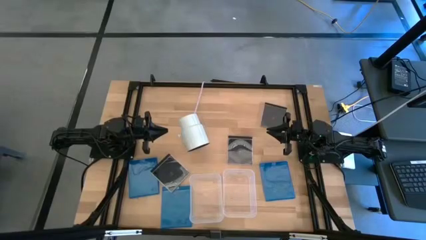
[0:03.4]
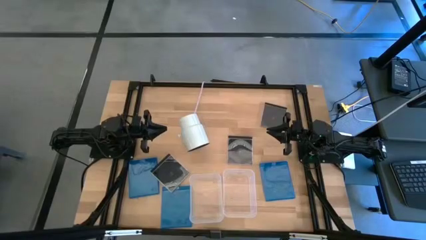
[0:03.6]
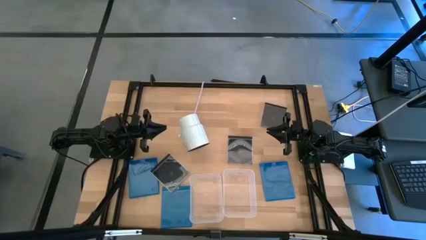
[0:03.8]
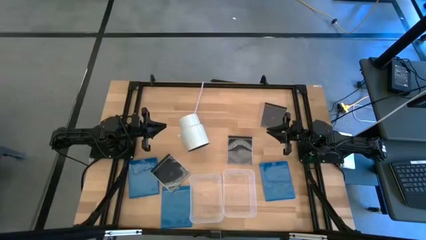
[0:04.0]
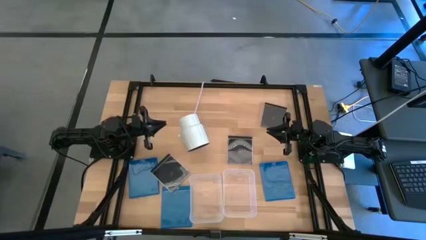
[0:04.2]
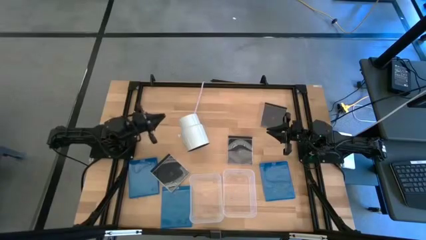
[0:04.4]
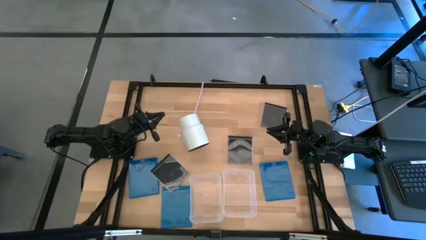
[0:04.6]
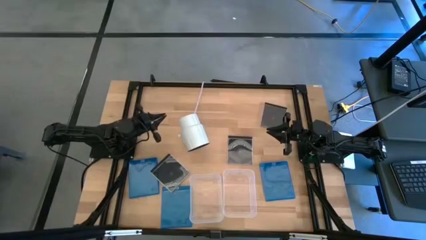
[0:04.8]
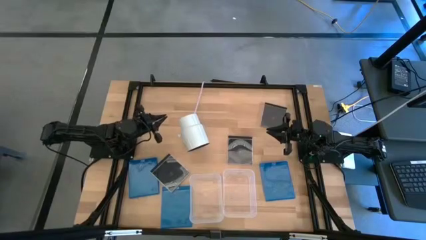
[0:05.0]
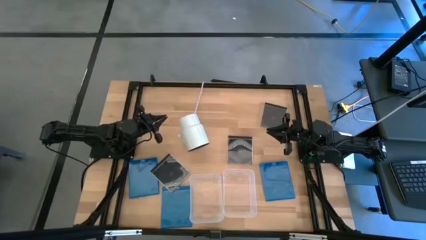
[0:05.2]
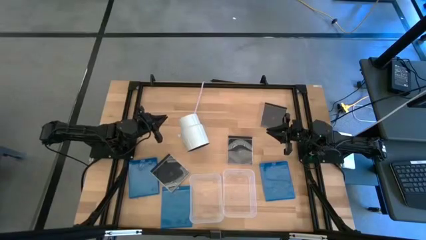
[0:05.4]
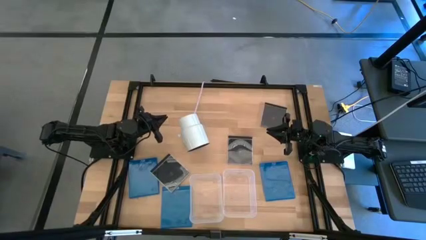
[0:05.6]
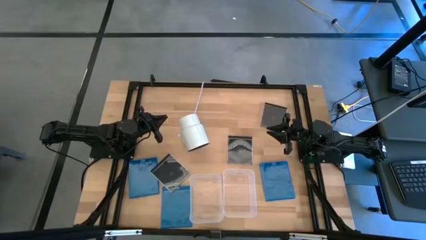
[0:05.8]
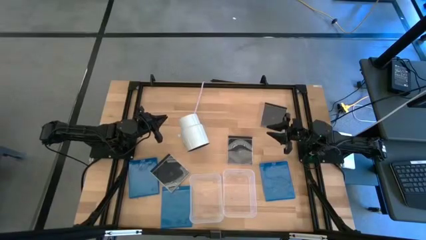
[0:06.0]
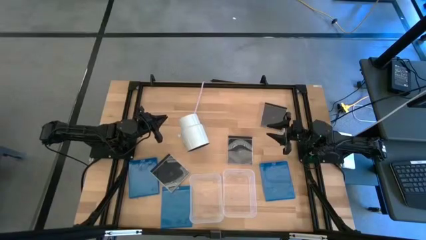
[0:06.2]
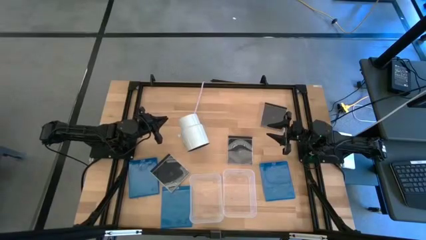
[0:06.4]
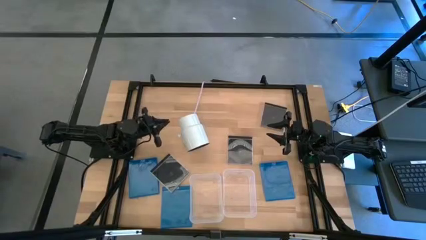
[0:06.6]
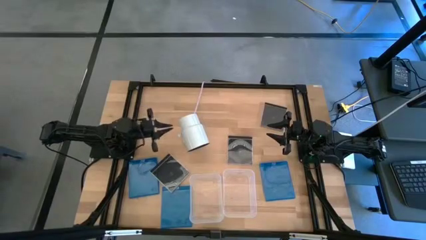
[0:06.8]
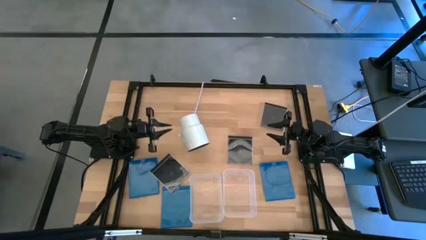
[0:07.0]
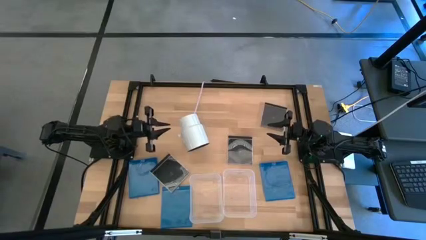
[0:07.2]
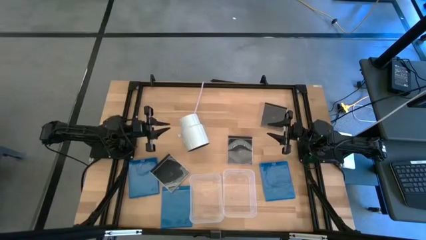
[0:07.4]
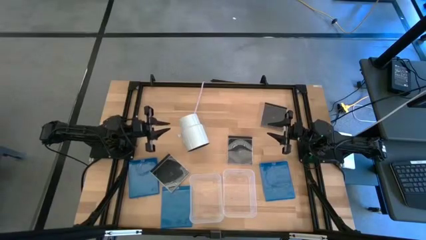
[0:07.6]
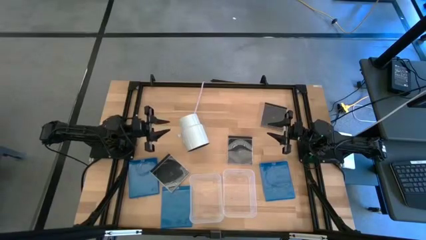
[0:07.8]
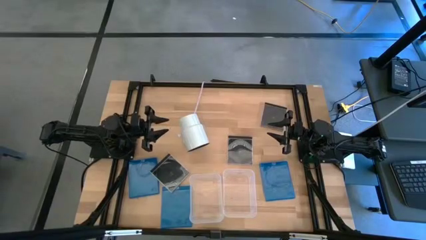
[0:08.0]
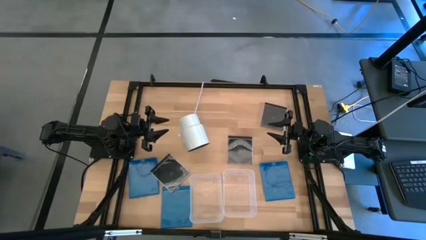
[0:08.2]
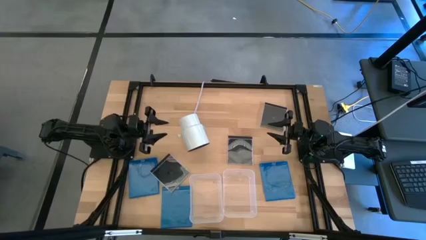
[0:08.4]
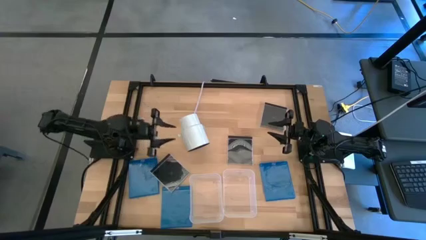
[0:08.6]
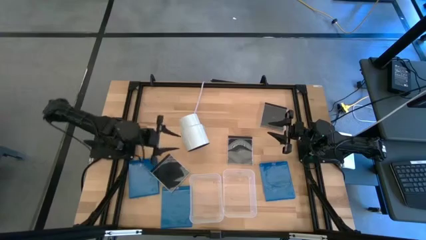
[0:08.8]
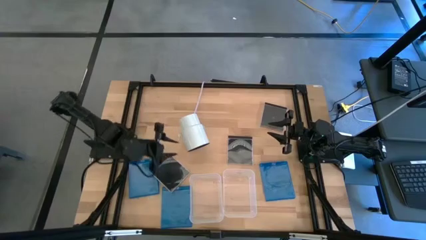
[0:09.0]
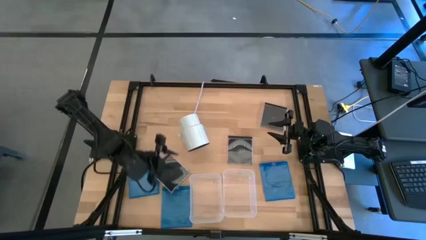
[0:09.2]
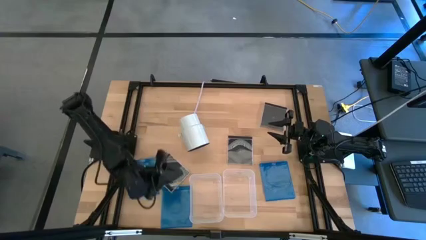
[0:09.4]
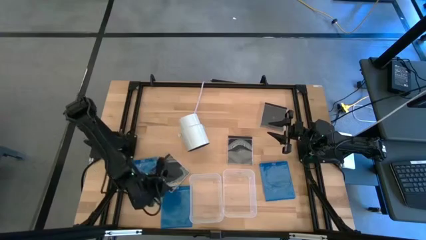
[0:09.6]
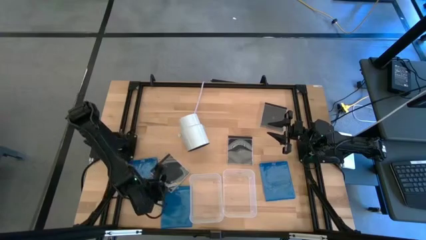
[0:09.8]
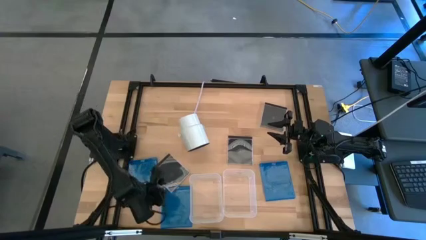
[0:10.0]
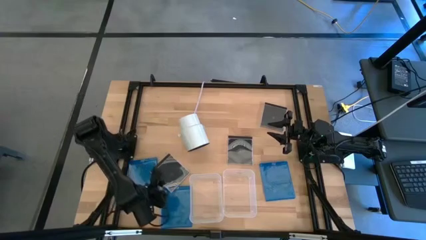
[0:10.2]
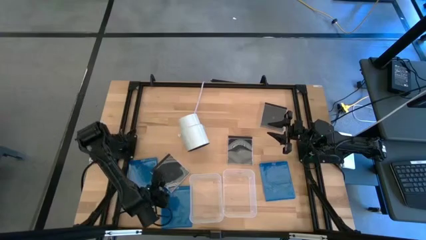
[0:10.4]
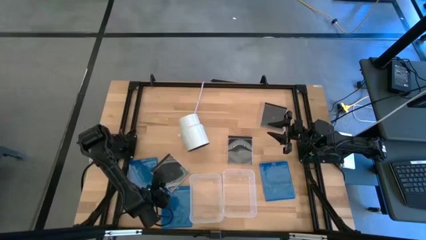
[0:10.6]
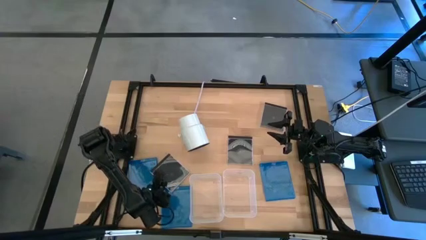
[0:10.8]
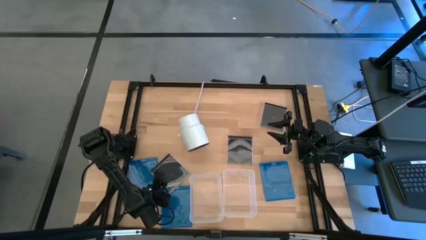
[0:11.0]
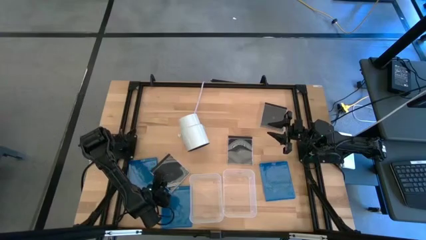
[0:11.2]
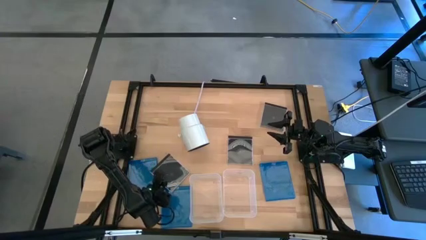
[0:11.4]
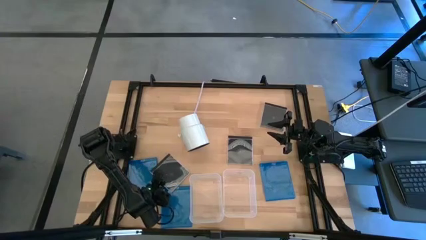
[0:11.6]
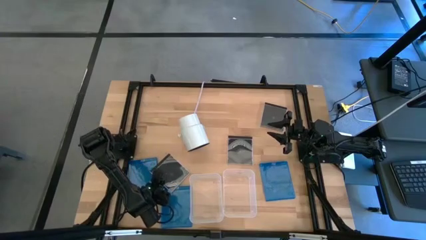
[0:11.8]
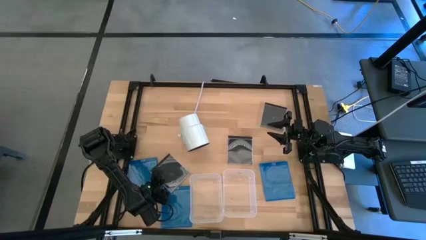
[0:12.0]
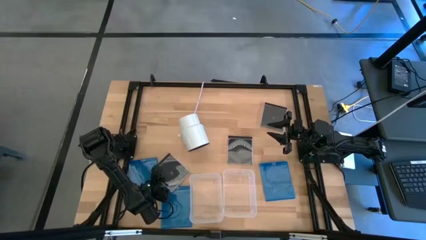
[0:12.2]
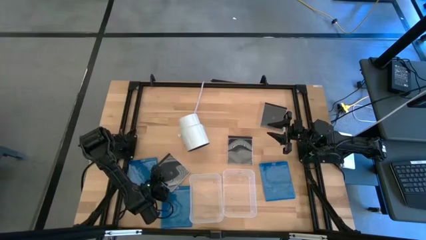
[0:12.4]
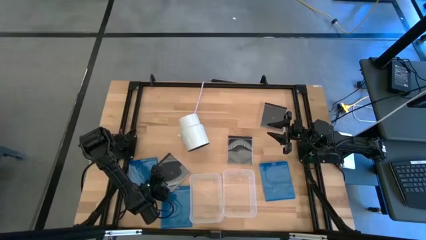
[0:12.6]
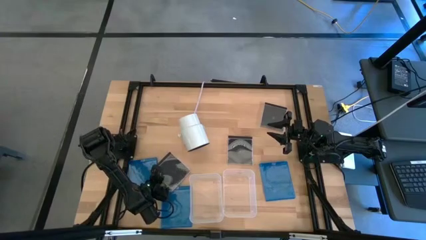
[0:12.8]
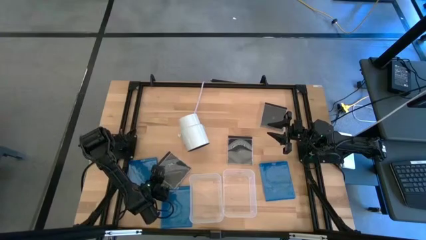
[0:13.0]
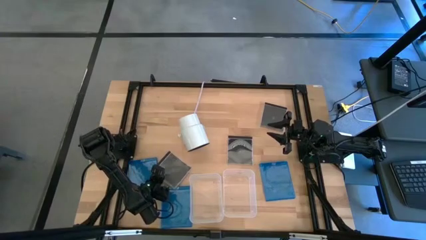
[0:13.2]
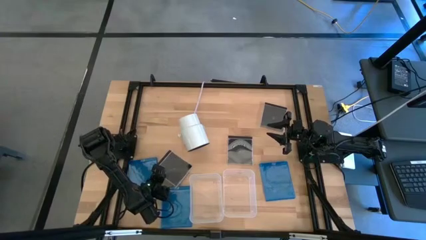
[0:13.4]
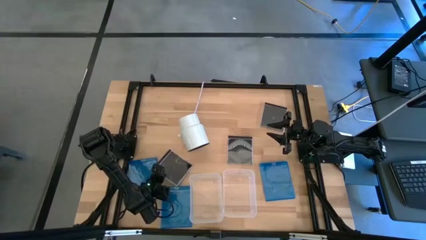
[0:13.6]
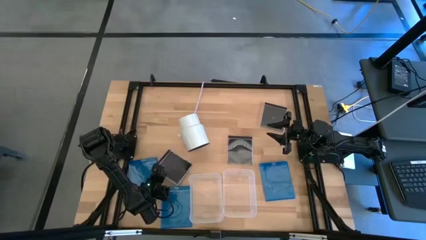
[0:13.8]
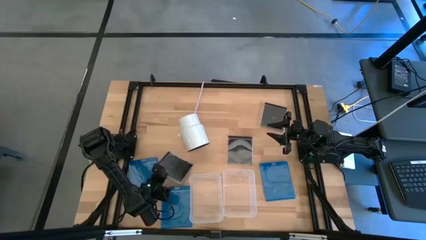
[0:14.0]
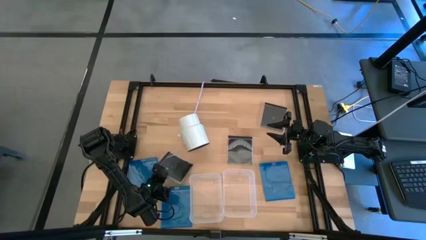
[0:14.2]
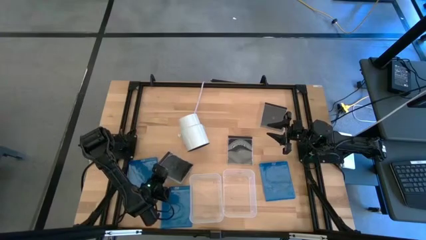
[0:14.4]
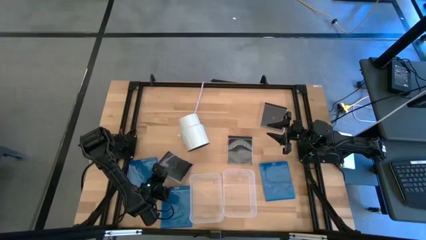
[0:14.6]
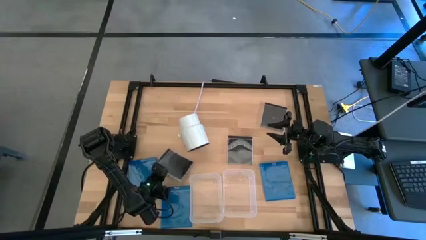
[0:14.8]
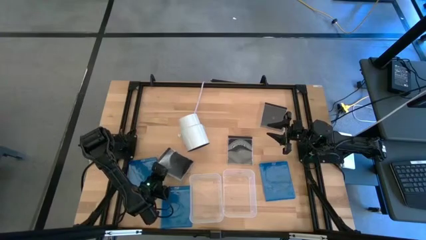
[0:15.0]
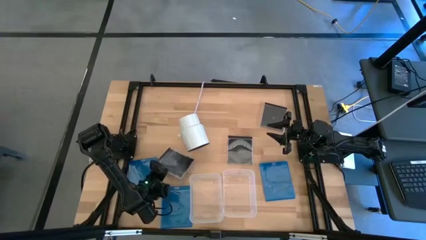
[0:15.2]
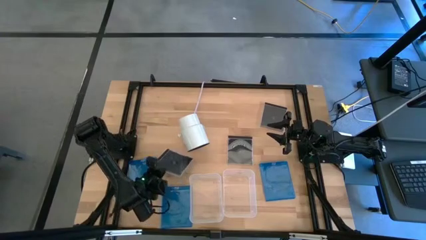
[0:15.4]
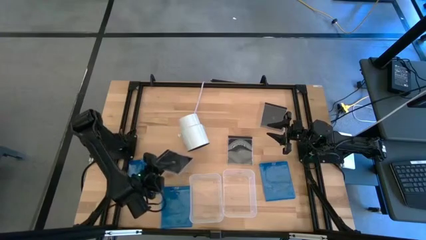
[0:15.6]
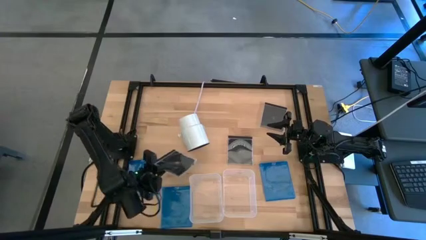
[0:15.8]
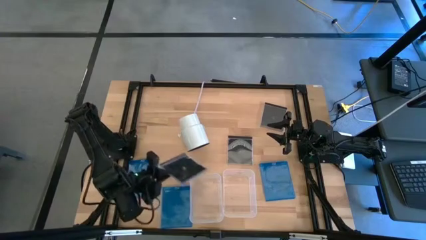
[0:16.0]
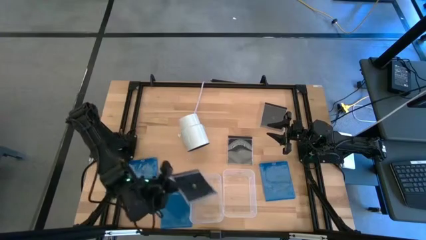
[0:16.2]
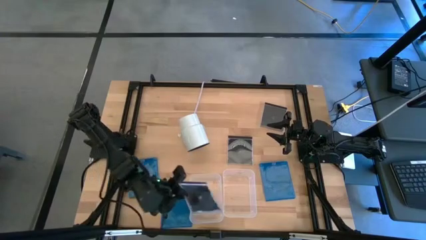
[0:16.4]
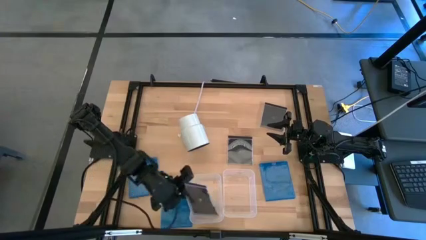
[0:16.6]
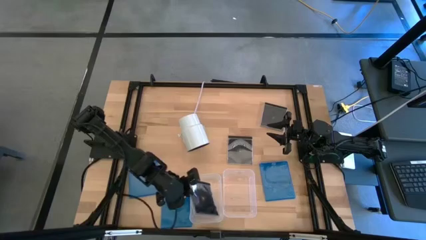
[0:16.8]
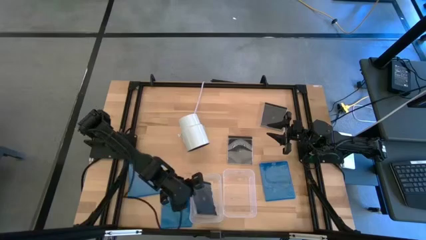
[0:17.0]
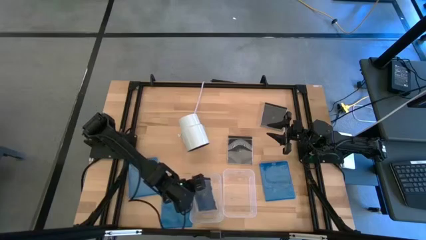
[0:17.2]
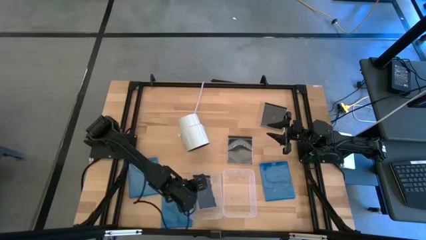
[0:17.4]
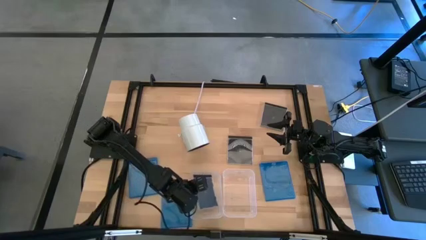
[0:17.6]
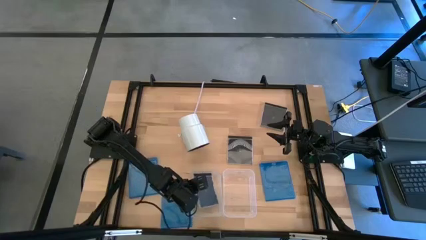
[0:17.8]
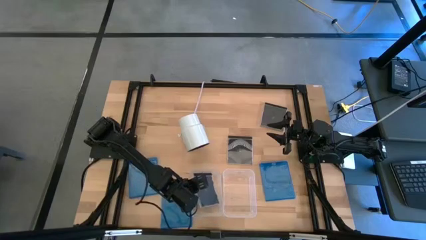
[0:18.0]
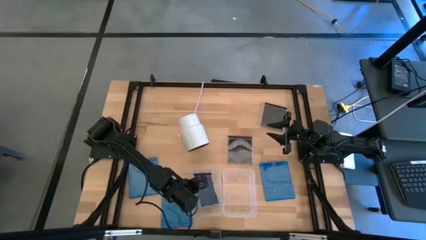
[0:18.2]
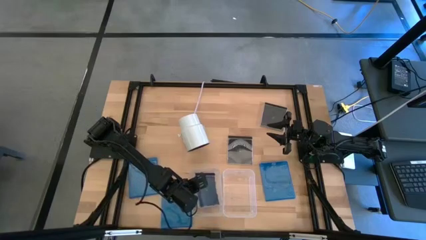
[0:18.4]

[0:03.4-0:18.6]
Task: Pick & place jewel cases by type
Put the bottom left black cd case into the left transparent bin
